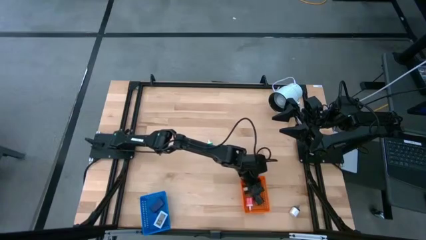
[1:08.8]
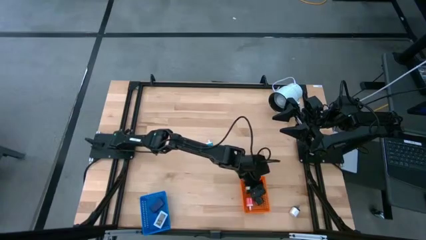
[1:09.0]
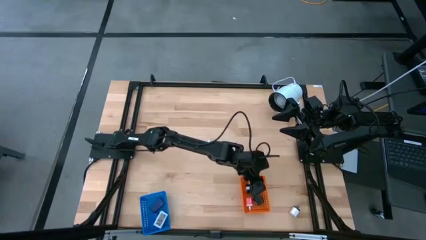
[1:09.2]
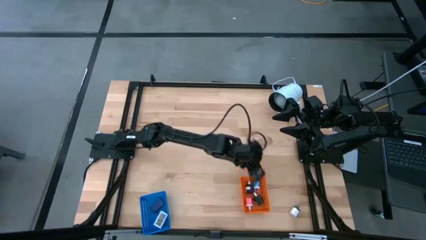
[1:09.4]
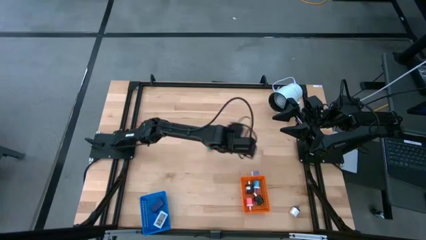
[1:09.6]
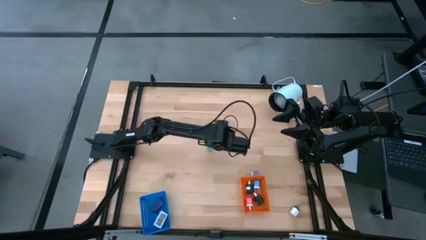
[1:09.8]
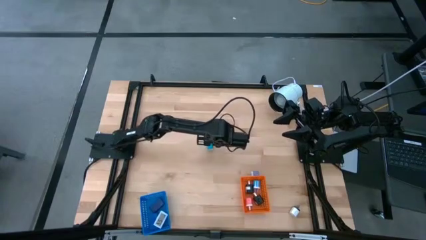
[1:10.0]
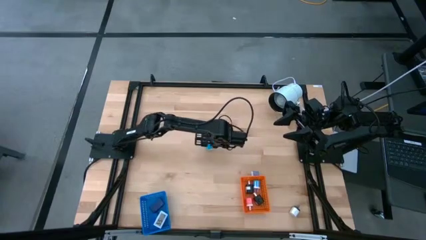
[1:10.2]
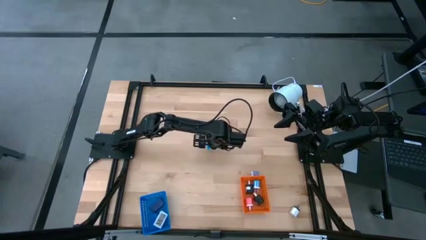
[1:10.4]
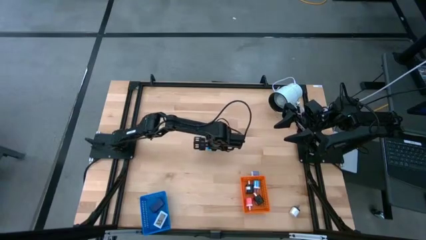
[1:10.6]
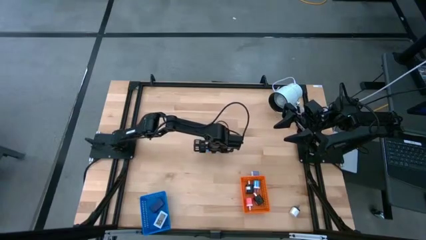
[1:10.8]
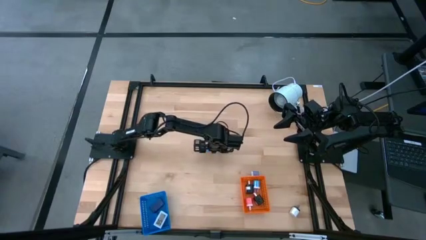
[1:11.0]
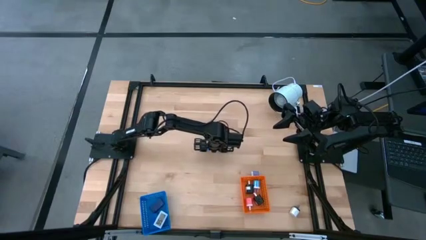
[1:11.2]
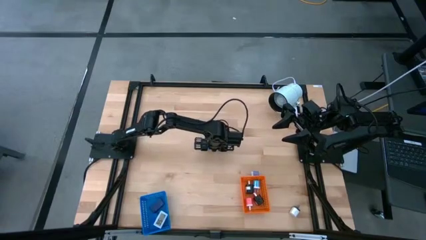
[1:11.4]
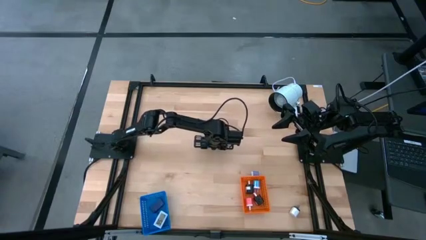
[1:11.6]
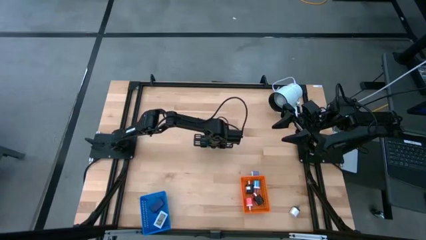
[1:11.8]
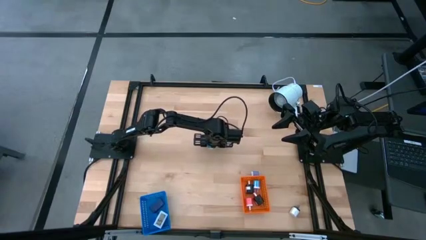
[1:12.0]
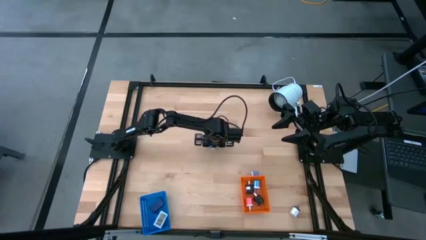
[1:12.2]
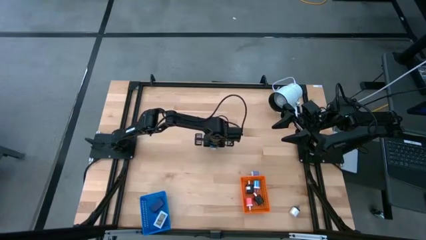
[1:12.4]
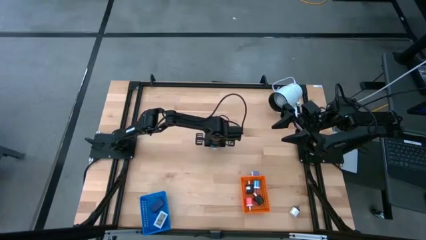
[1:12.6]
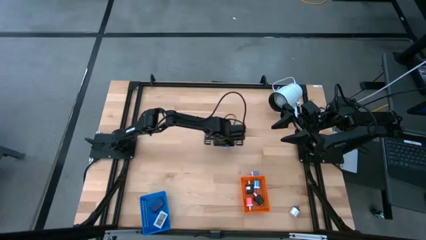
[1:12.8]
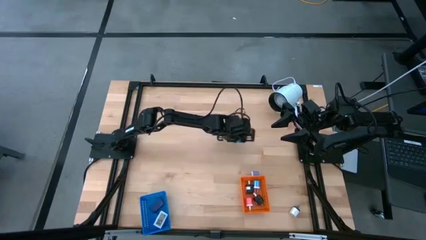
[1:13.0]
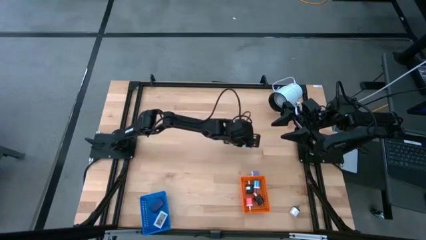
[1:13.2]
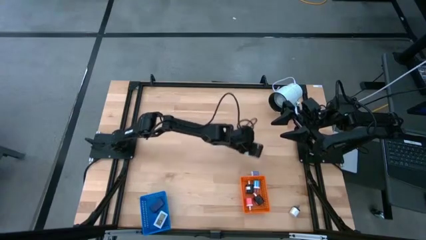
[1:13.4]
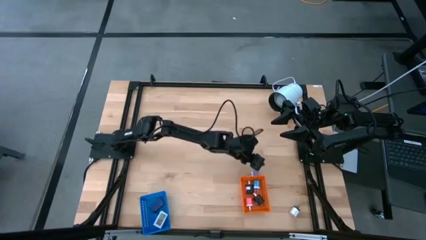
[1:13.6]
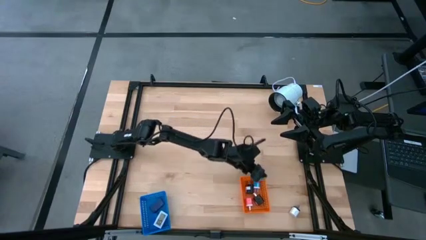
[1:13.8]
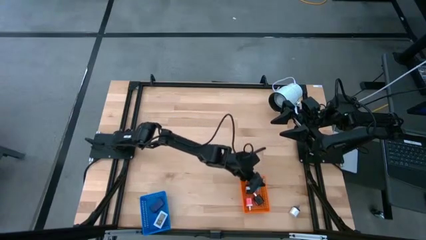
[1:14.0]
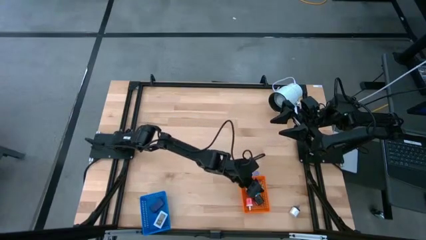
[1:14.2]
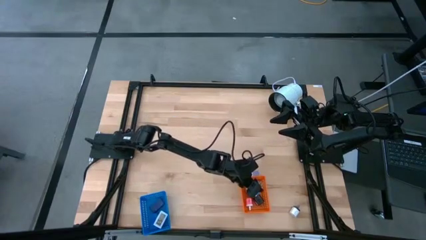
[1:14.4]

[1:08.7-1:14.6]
Task: Pick & Place Office items
Put the blue charger adapter into the orange bin

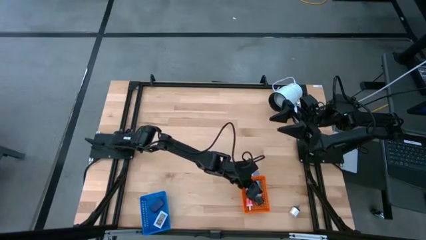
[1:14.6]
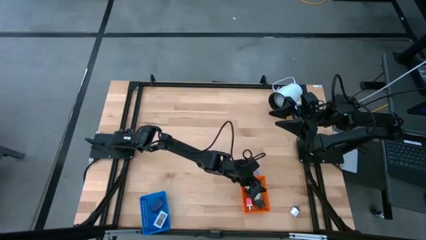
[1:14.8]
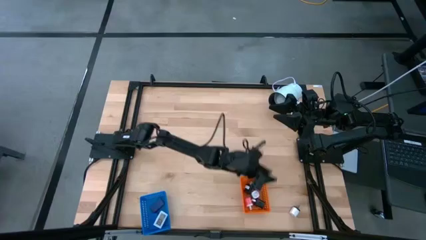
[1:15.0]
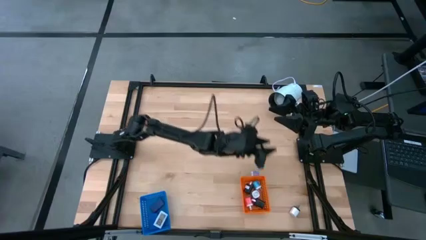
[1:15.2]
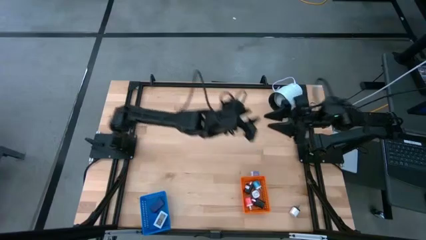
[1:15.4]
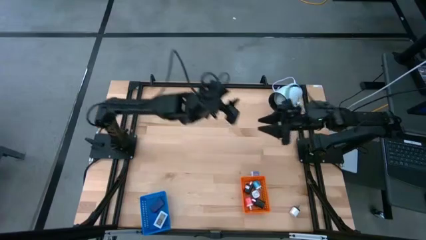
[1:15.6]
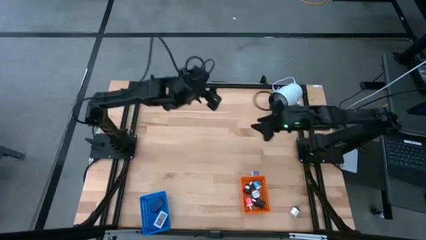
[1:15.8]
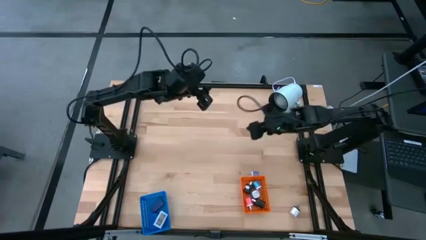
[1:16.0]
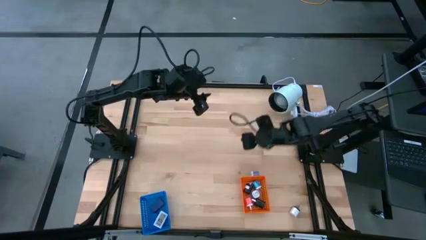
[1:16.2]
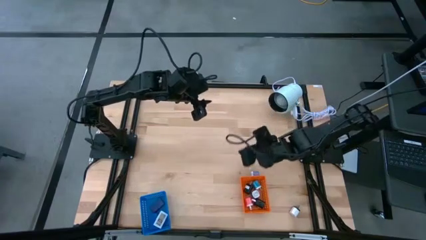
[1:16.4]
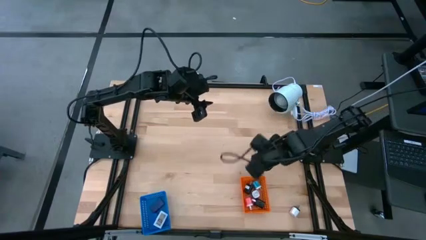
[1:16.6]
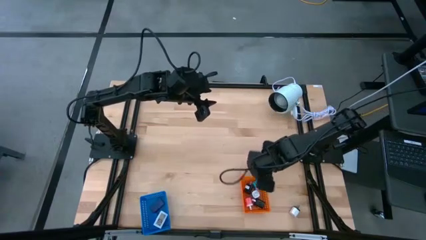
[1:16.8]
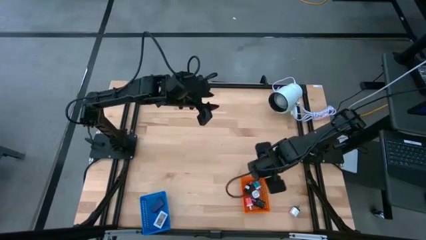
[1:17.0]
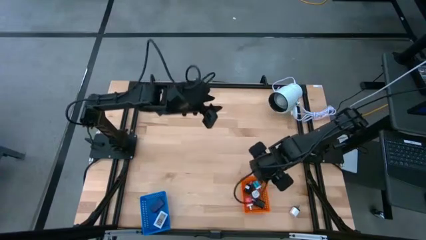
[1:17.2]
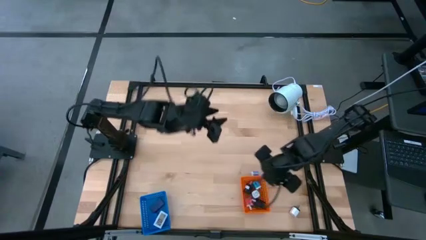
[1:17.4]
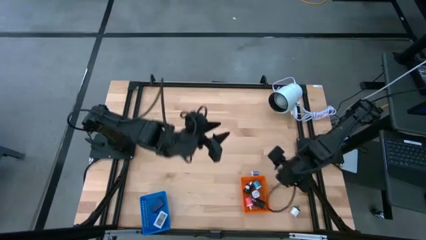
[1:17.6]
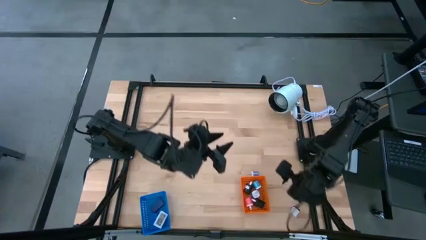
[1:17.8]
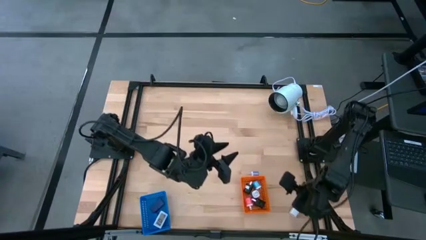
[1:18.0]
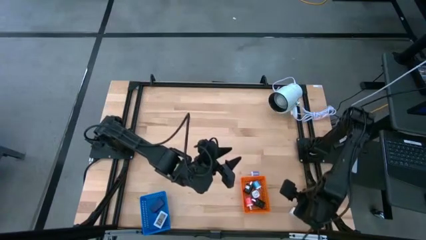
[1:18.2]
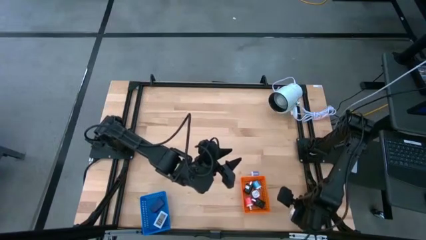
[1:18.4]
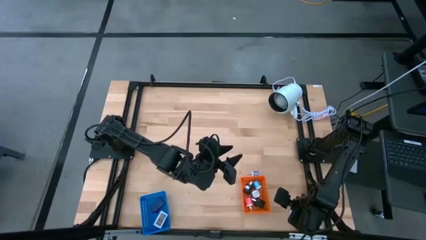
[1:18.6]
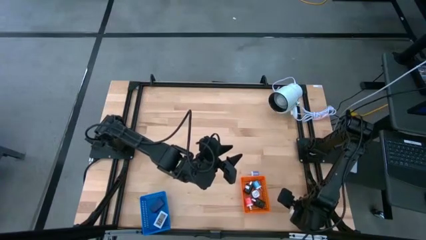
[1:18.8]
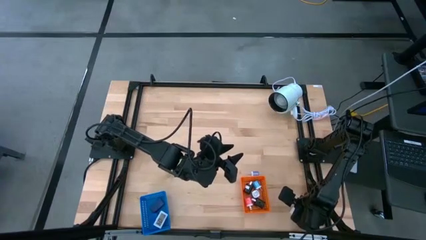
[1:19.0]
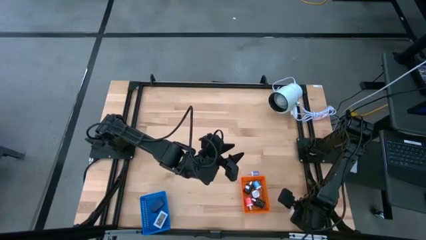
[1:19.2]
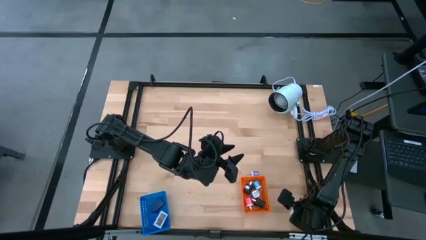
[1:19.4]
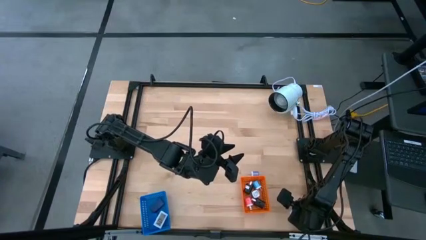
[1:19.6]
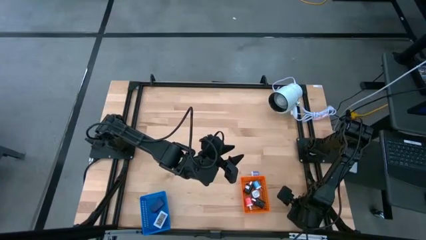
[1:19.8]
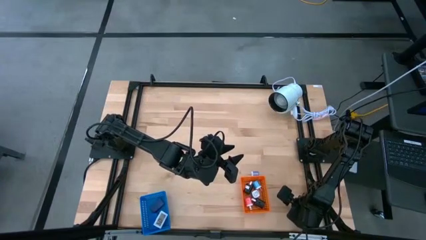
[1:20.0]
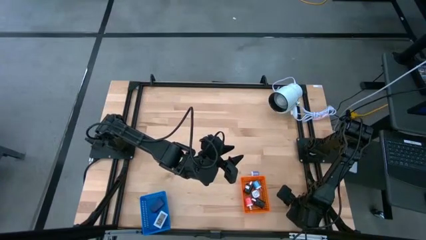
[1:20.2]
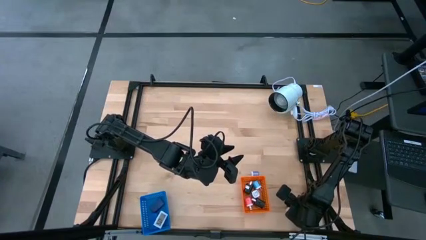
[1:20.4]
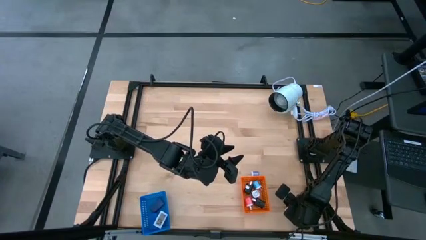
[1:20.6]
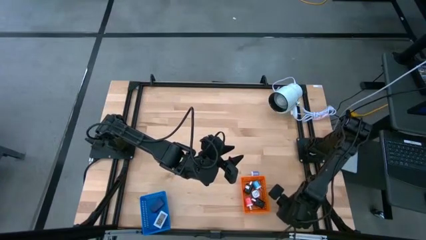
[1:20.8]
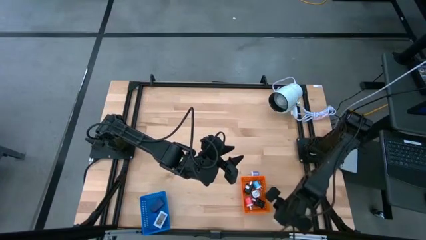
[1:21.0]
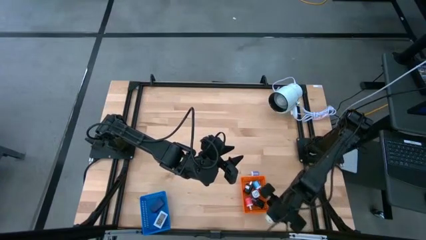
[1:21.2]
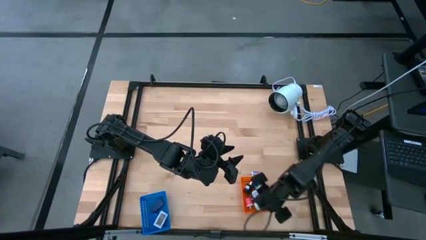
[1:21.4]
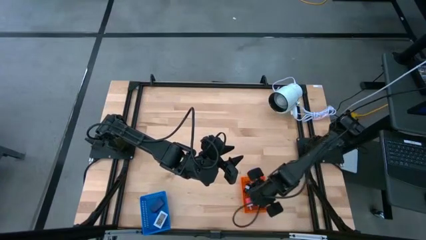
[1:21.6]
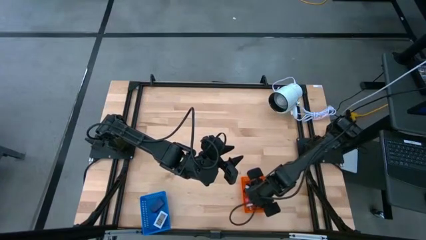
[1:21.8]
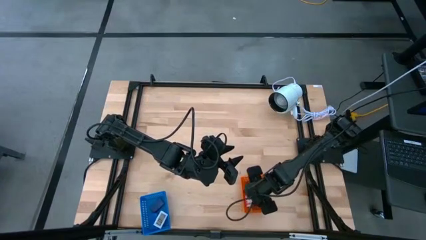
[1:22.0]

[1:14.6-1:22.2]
Put the white charger adapter into the orange bin

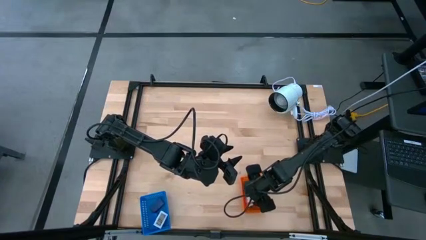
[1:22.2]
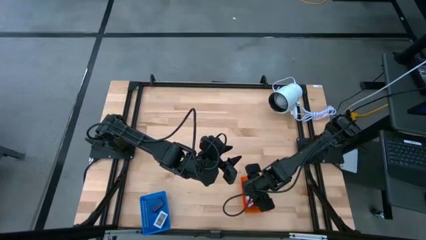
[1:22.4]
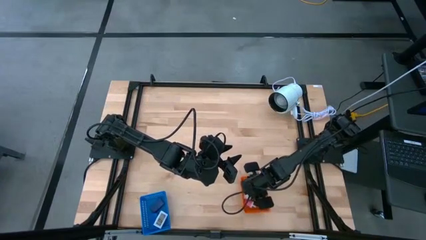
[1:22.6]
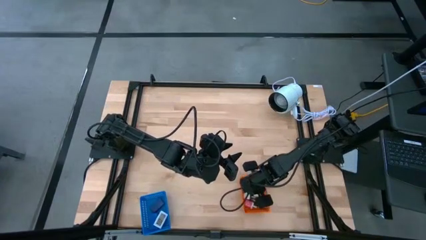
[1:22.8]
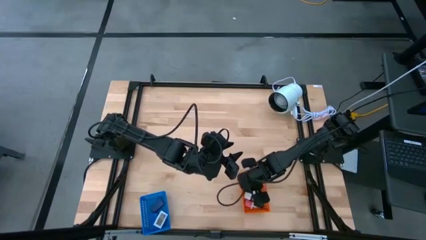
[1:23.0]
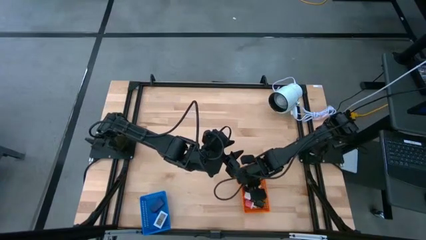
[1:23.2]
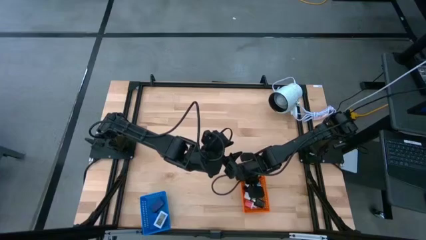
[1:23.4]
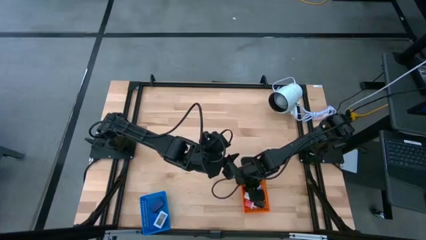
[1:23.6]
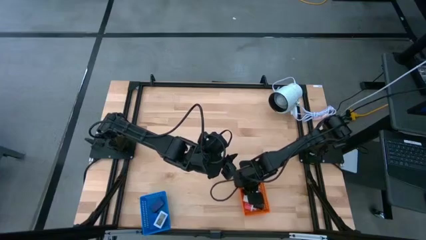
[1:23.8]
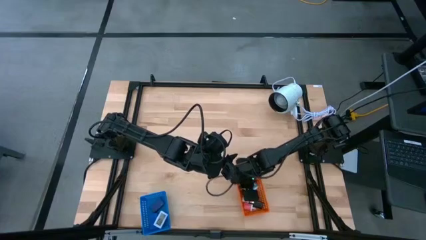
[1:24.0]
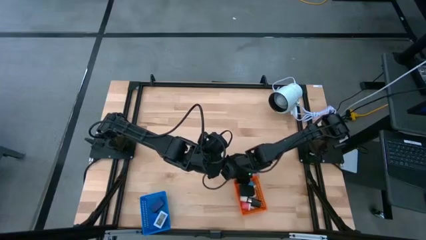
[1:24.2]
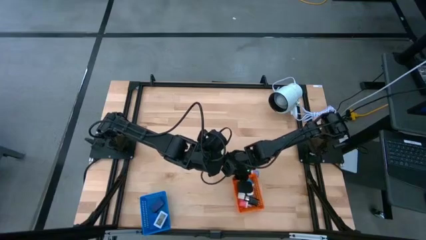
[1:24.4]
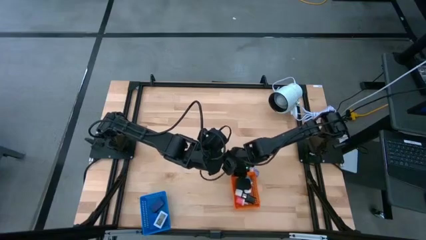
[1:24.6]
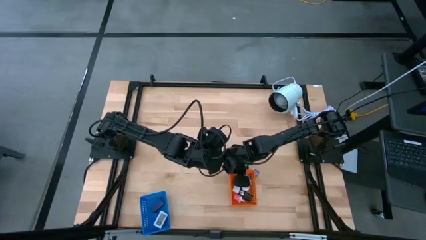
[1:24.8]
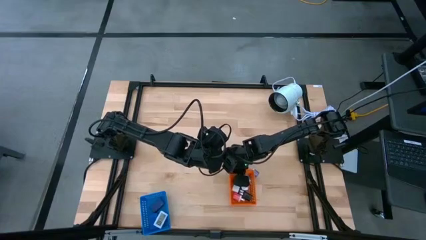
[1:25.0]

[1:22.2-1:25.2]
Adjust the orange bin
